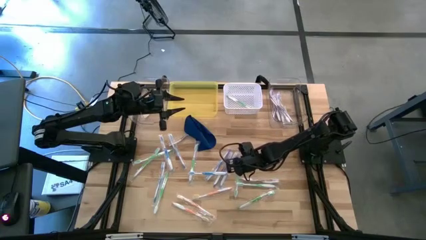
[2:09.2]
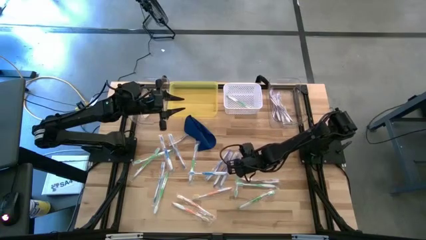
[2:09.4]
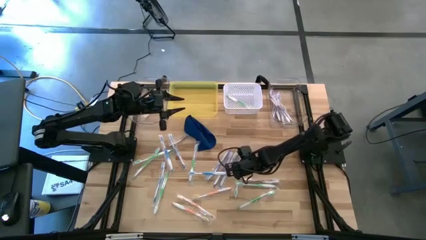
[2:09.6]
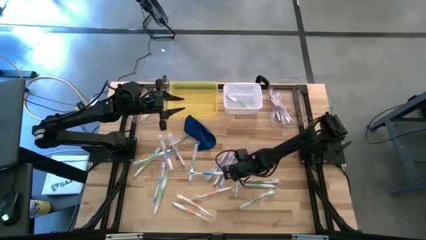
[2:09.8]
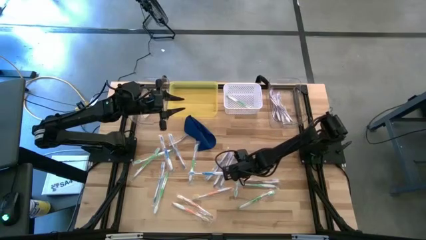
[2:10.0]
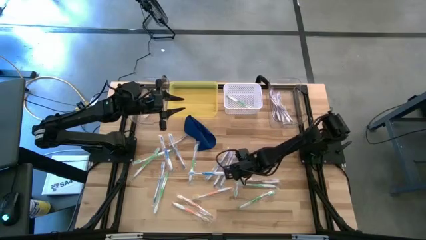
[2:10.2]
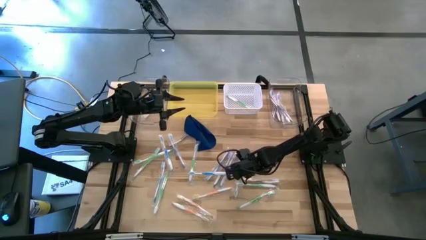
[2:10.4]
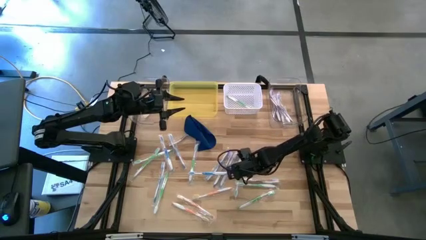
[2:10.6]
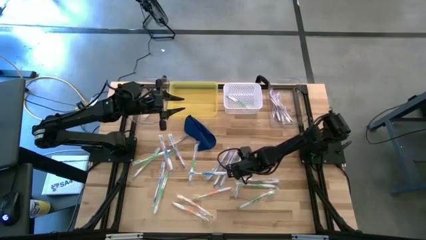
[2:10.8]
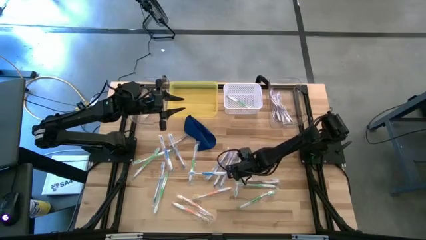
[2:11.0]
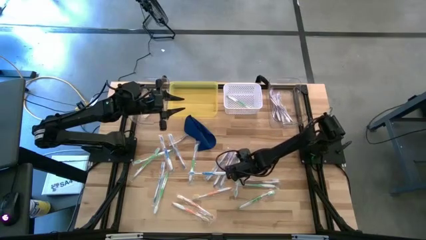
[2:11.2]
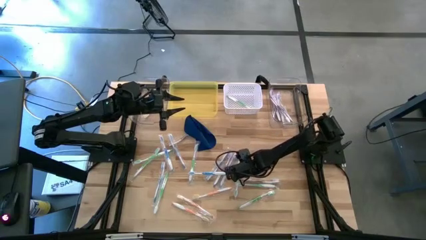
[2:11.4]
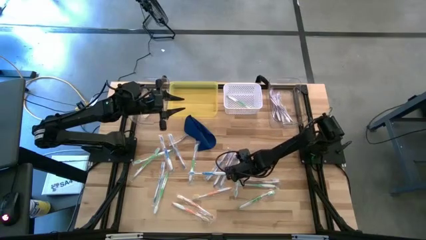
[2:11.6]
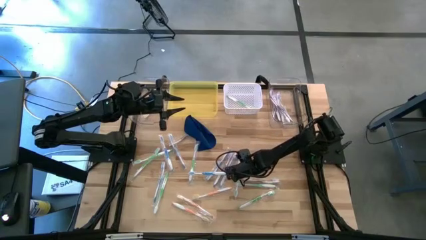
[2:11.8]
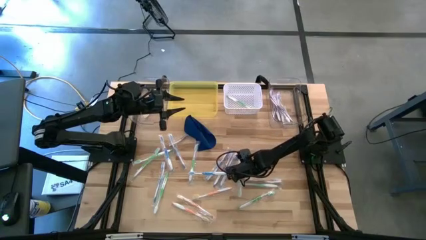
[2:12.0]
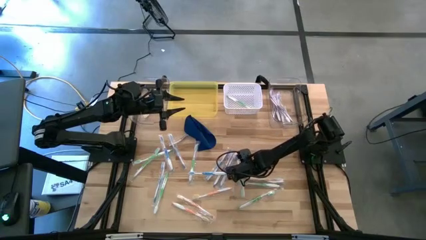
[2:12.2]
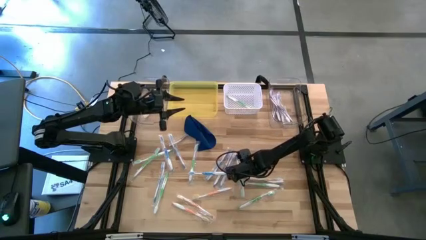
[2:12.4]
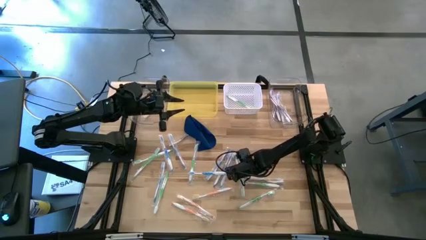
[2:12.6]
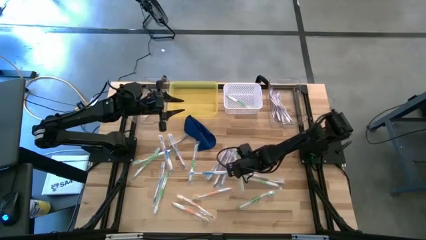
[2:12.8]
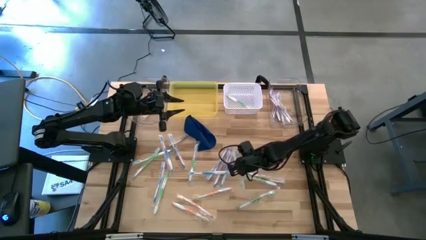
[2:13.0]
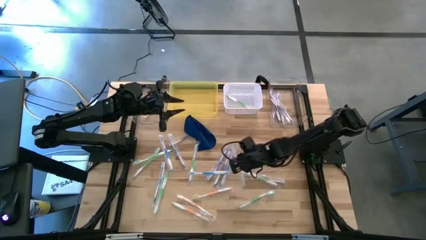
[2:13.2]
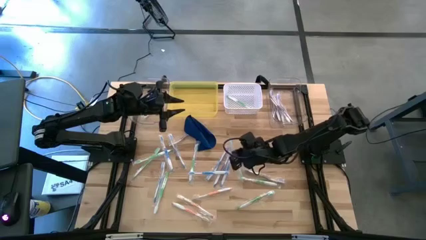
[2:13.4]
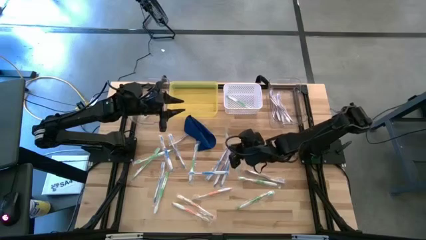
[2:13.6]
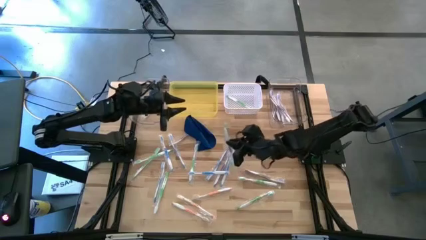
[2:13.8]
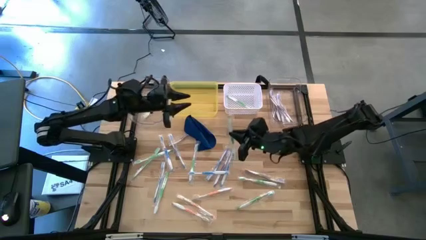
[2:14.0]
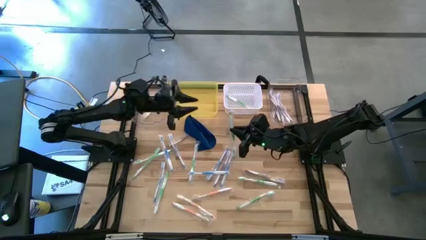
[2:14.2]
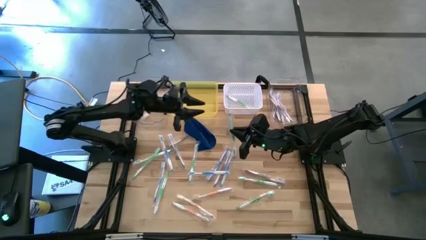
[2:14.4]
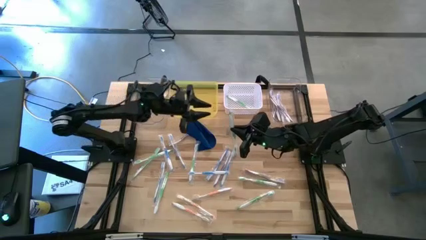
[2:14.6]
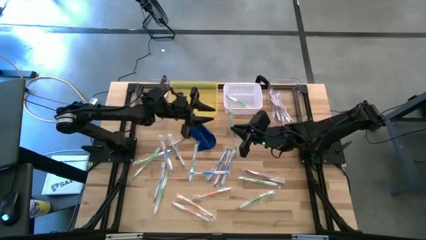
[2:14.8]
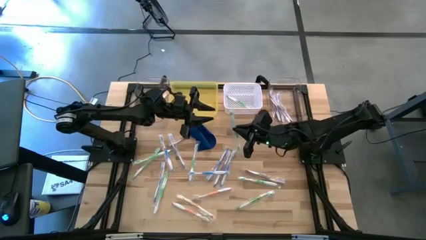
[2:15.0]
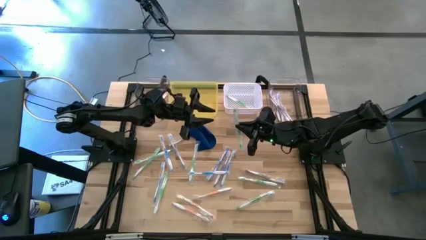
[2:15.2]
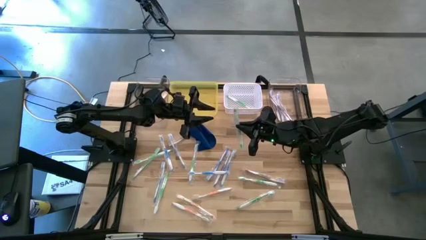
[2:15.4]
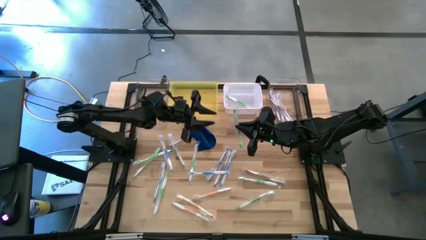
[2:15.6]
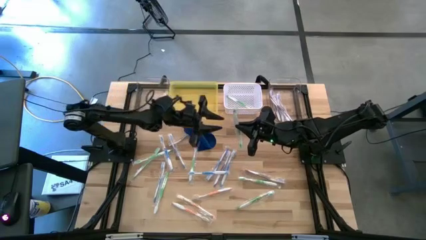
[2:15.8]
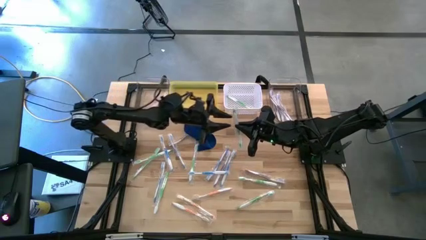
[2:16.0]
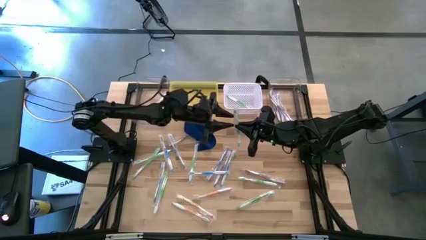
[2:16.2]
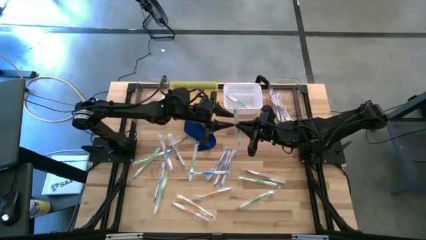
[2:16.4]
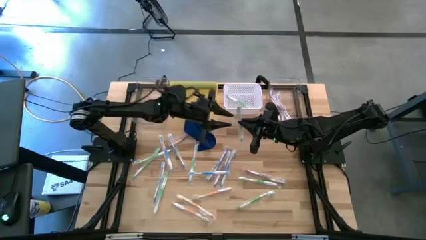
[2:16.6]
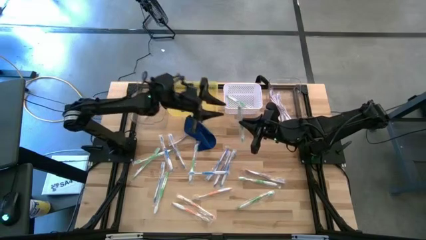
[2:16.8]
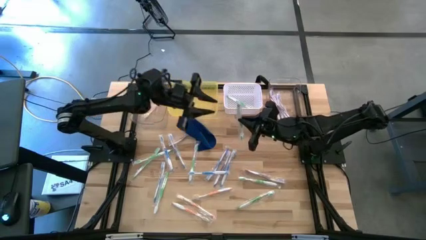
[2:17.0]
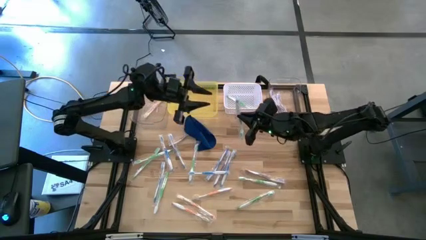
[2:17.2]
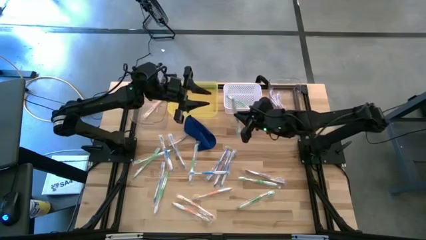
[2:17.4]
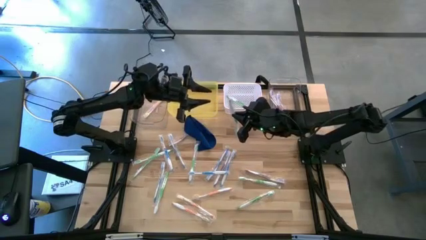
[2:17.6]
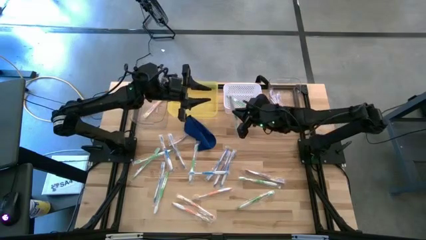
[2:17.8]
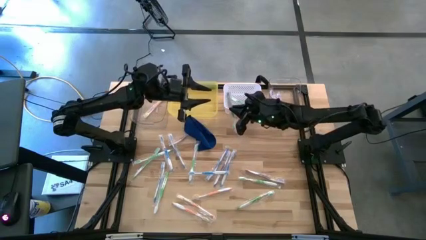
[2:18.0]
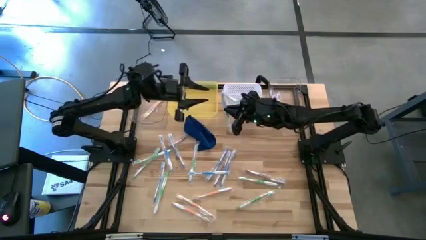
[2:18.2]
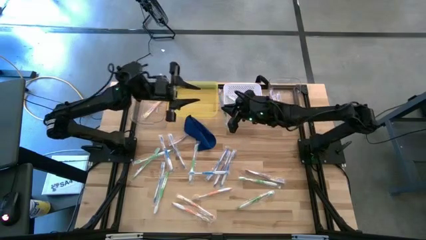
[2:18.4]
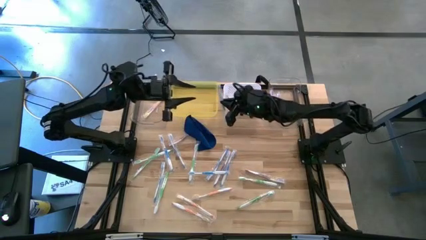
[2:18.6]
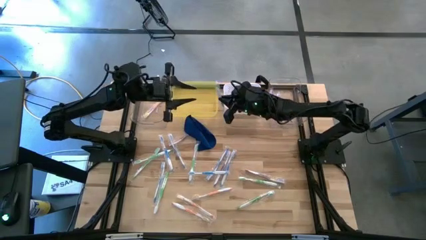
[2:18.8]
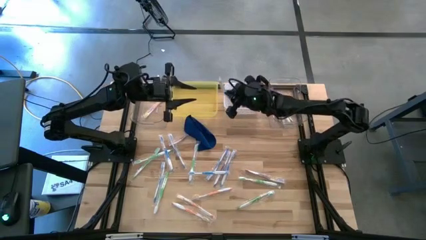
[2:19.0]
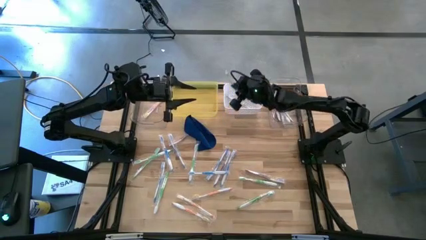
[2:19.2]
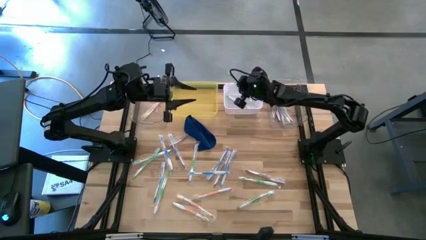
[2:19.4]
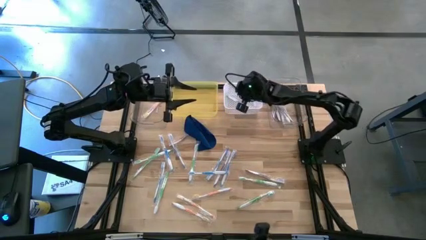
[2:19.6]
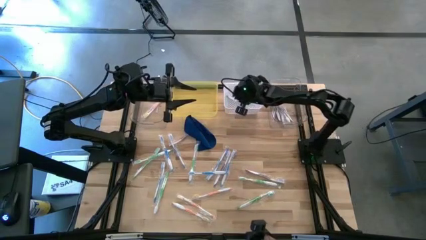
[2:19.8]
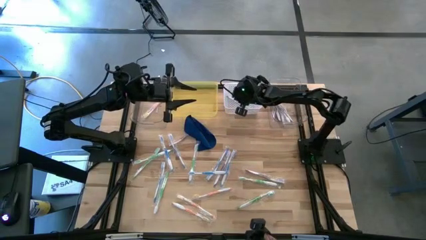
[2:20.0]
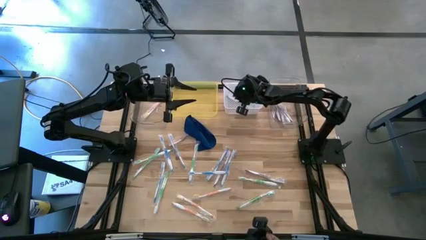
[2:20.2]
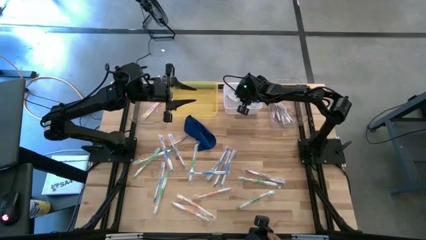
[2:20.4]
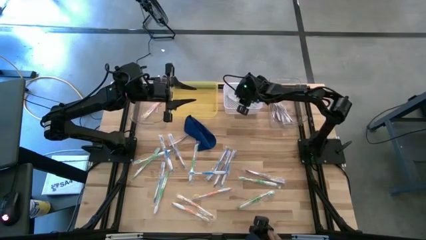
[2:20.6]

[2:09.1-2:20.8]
Task: Pick & Place Toothbrushes
Put the green toothbrush into the white bin

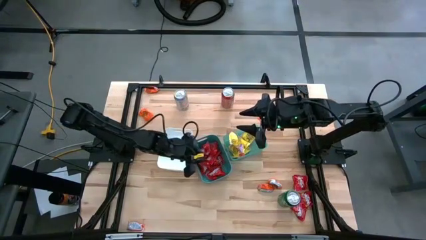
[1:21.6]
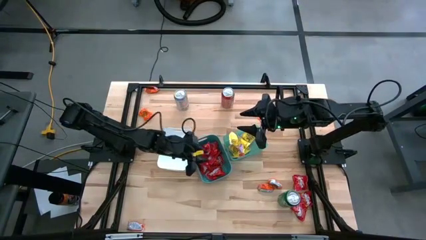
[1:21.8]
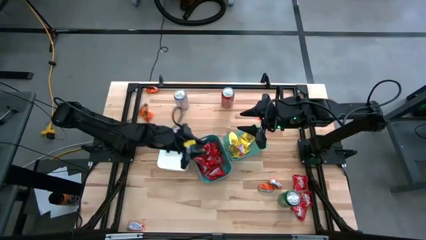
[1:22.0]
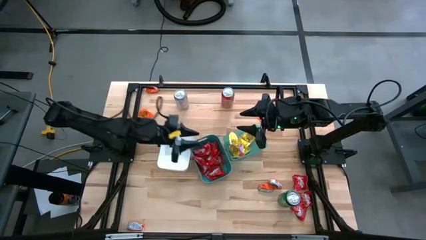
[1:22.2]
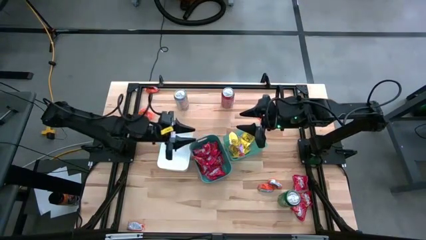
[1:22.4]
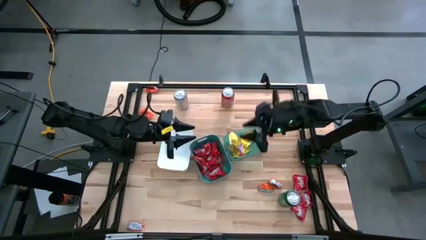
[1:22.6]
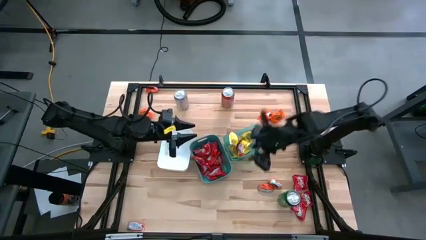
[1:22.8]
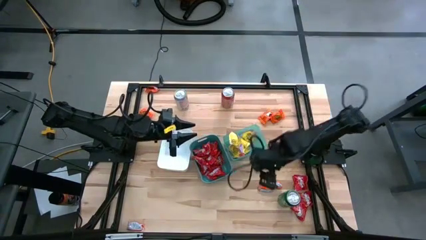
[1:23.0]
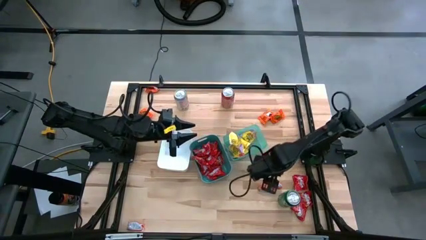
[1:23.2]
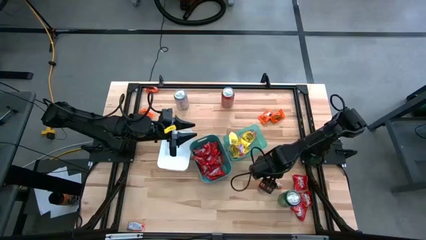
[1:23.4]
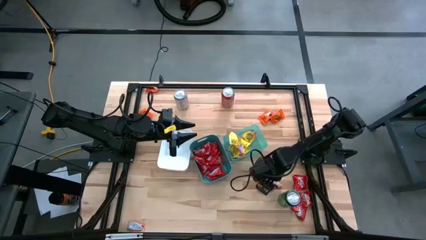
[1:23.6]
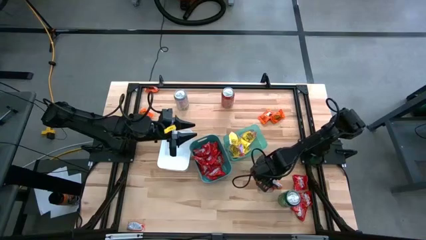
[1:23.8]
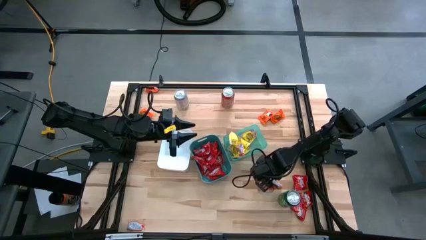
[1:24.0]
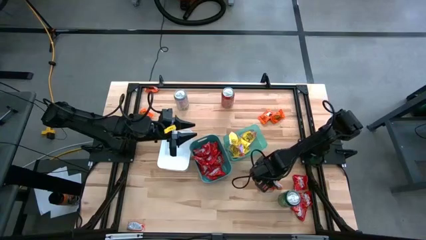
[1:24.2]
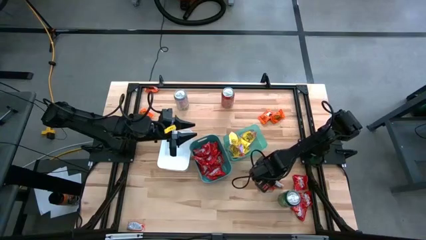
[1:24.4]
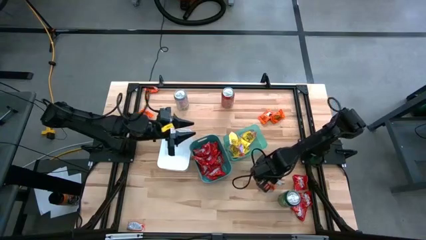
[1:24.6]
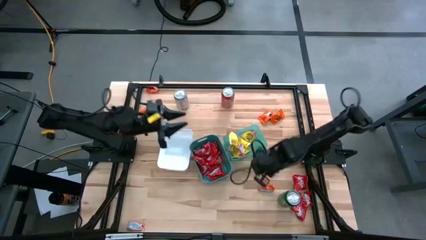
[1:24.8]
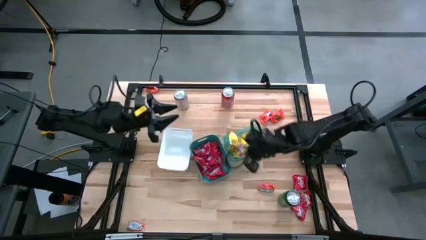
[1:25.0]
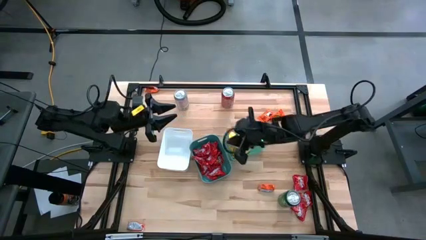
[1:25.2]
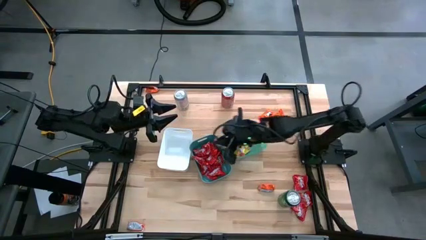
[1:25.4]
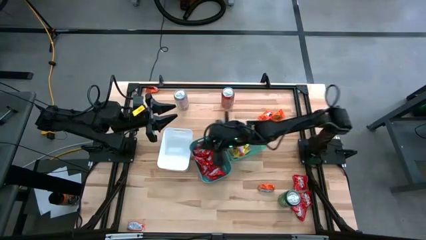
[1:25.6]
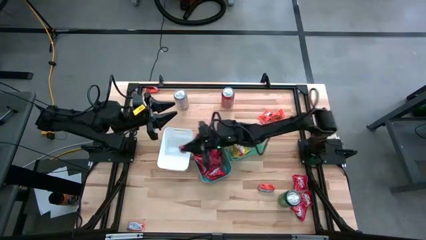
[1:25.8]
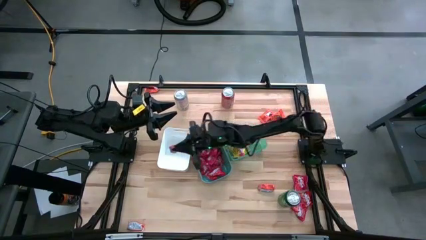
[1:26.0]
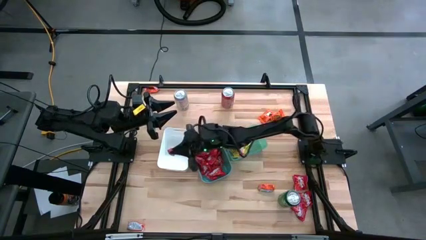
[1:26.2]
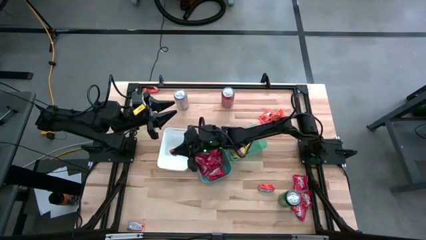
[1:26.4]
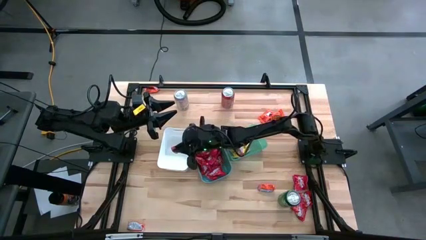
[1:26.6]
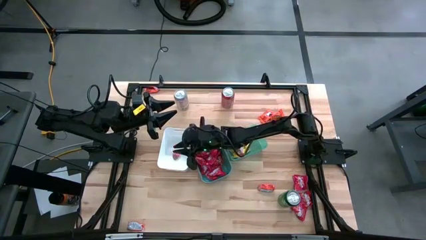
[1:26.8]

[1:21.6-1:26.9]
Task: Sort candy
Put the orange chocolate into the white bin
